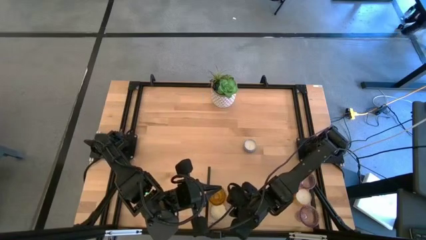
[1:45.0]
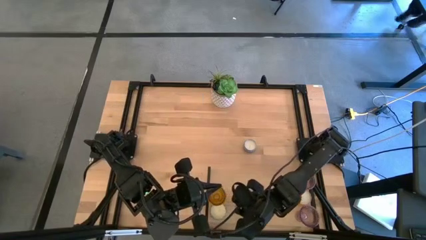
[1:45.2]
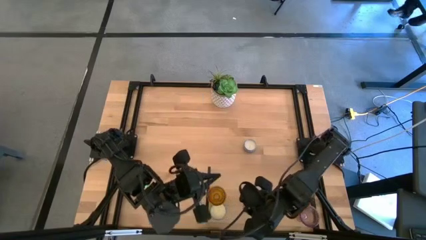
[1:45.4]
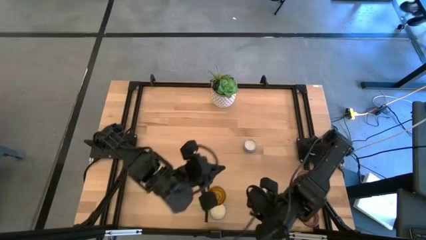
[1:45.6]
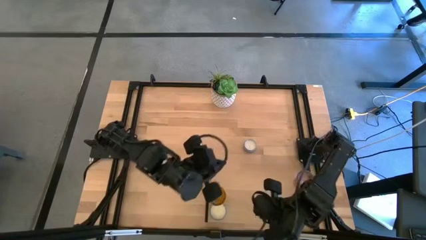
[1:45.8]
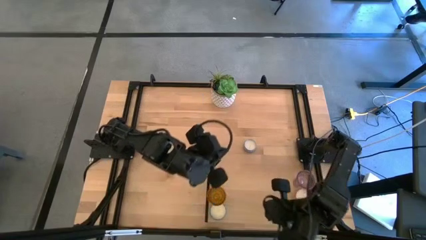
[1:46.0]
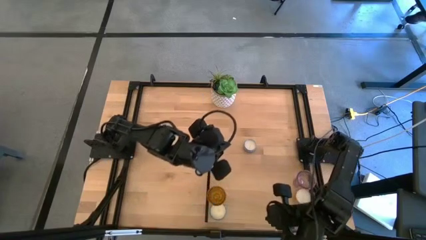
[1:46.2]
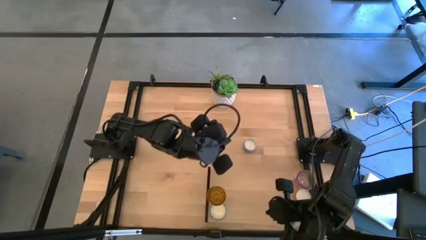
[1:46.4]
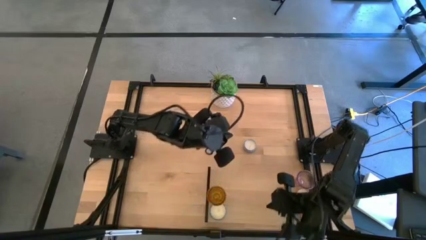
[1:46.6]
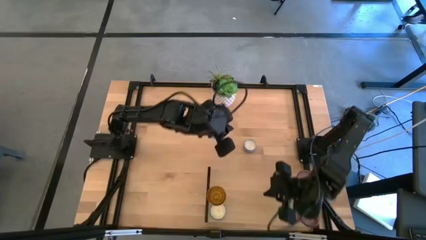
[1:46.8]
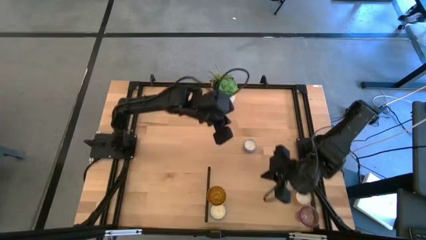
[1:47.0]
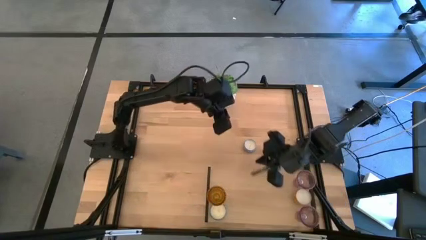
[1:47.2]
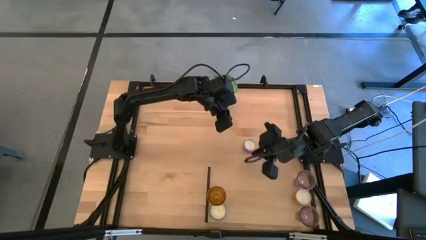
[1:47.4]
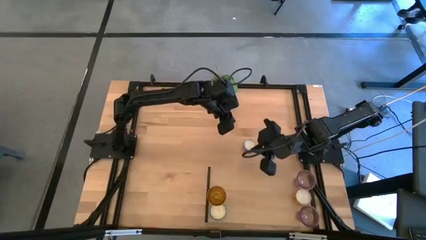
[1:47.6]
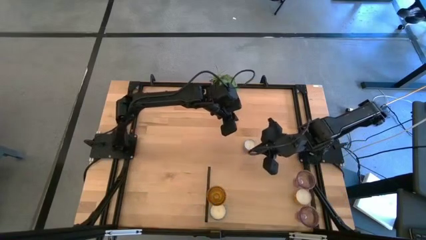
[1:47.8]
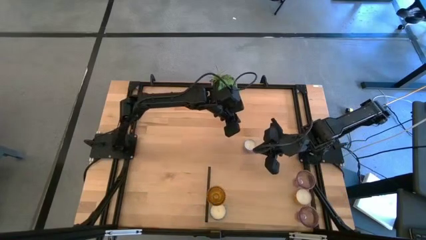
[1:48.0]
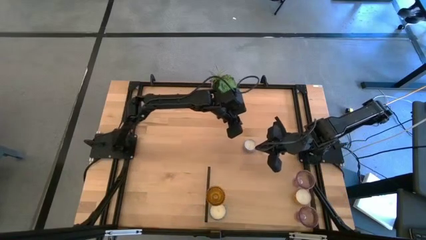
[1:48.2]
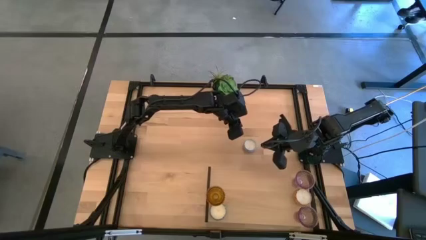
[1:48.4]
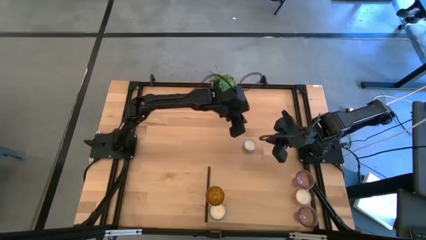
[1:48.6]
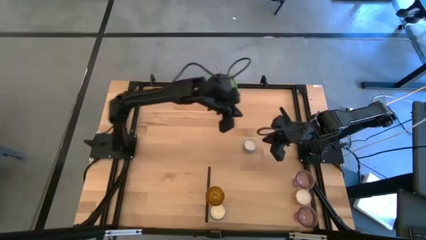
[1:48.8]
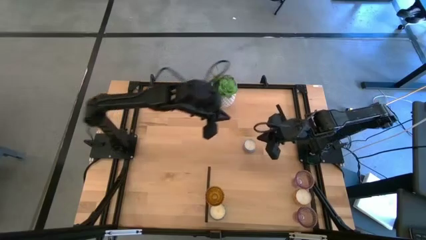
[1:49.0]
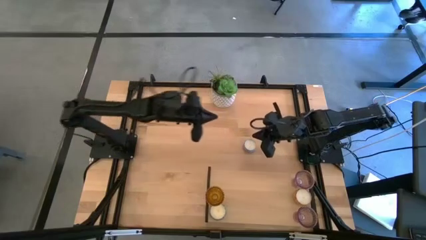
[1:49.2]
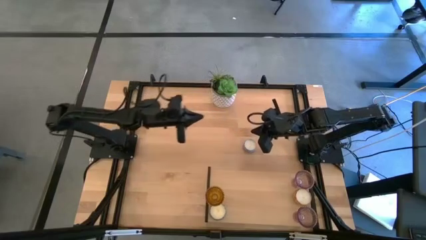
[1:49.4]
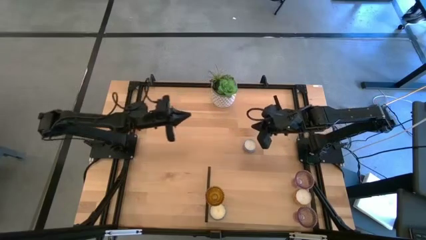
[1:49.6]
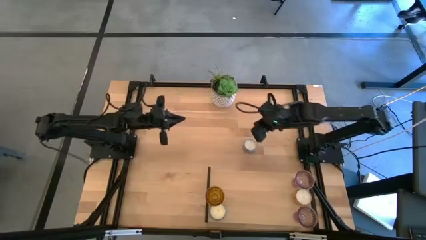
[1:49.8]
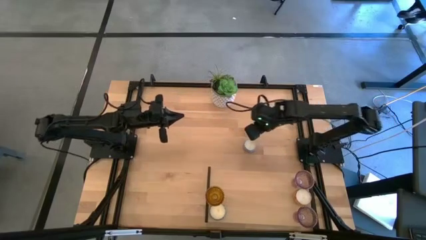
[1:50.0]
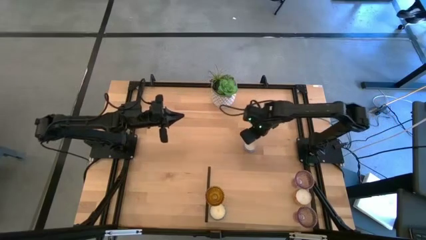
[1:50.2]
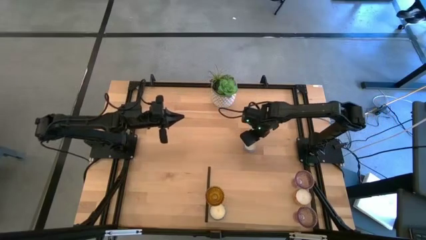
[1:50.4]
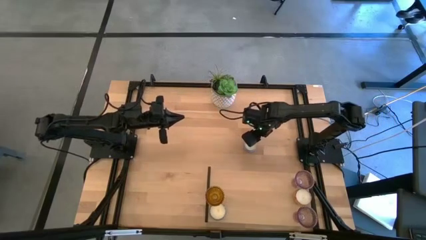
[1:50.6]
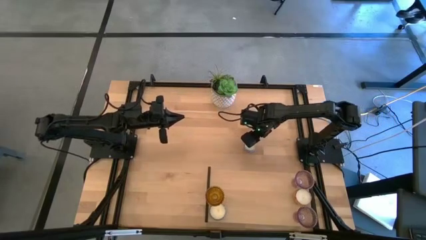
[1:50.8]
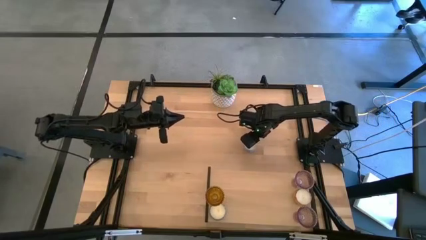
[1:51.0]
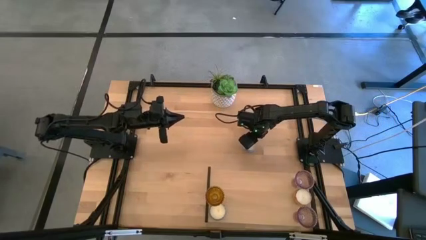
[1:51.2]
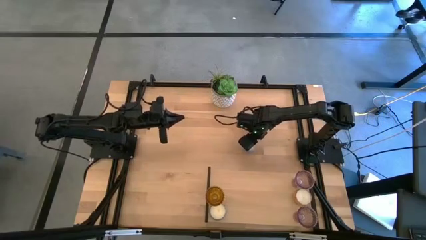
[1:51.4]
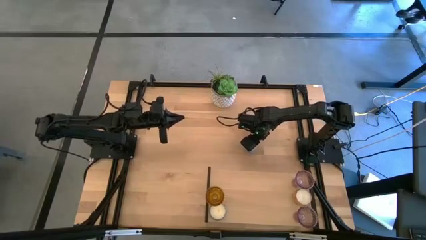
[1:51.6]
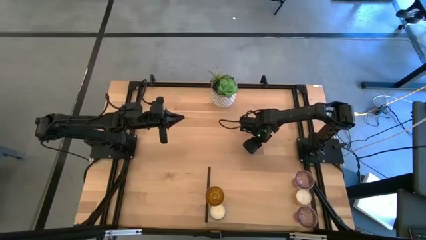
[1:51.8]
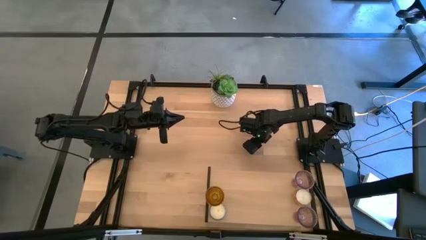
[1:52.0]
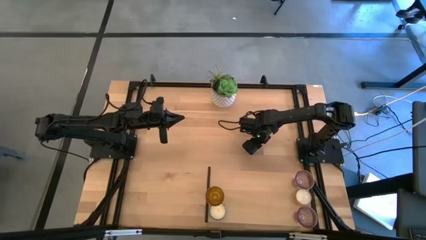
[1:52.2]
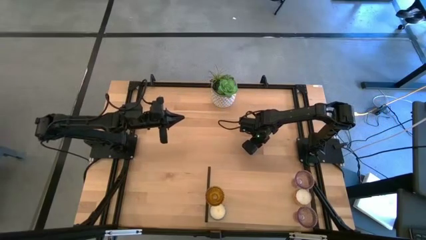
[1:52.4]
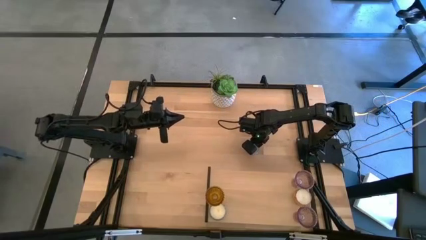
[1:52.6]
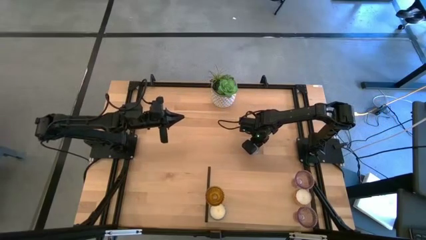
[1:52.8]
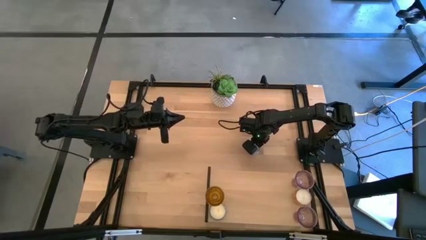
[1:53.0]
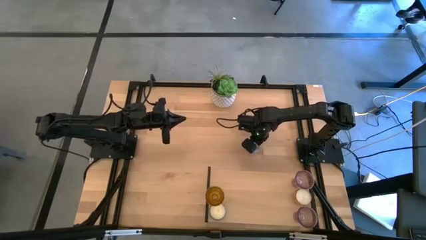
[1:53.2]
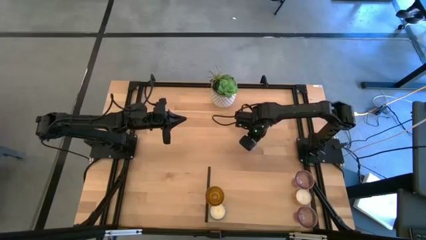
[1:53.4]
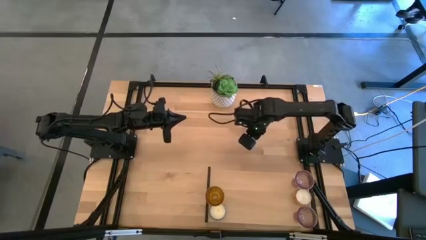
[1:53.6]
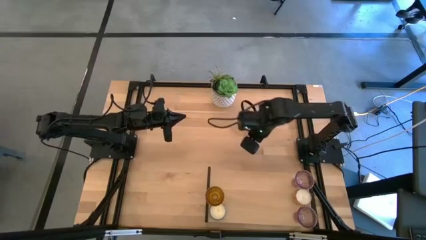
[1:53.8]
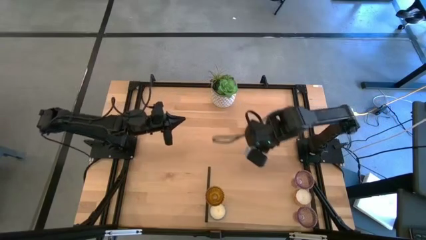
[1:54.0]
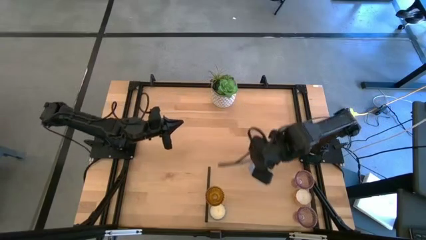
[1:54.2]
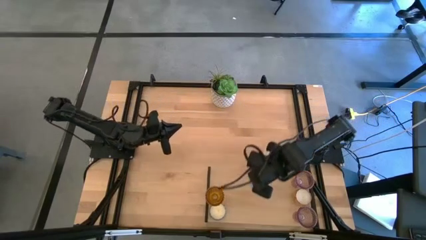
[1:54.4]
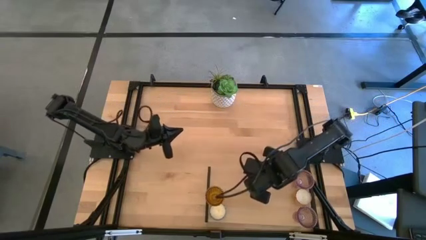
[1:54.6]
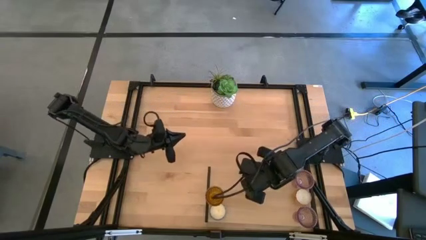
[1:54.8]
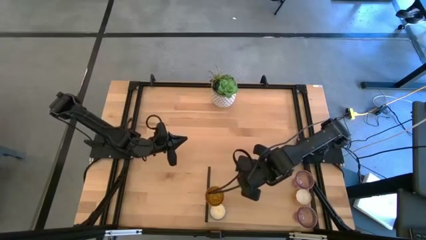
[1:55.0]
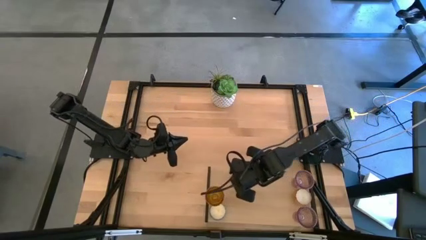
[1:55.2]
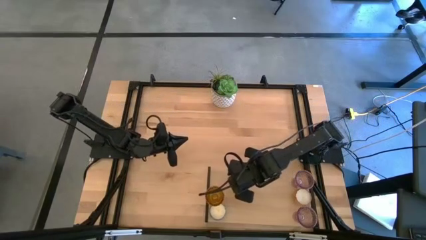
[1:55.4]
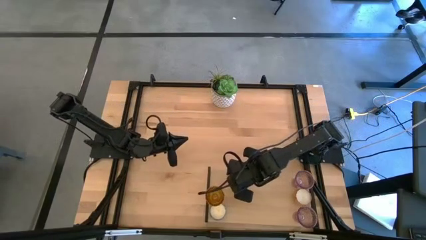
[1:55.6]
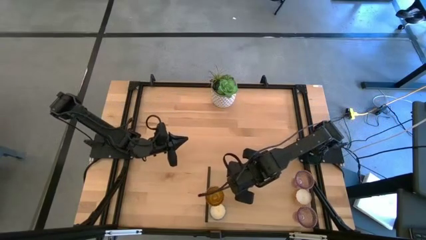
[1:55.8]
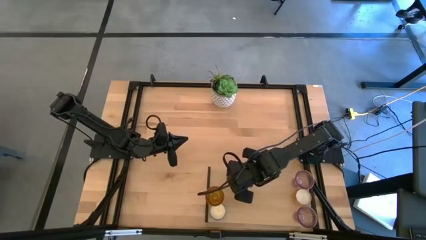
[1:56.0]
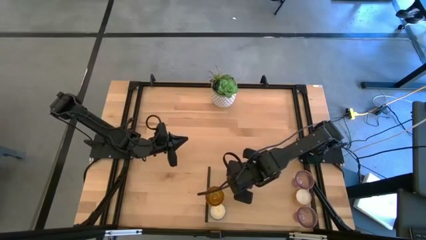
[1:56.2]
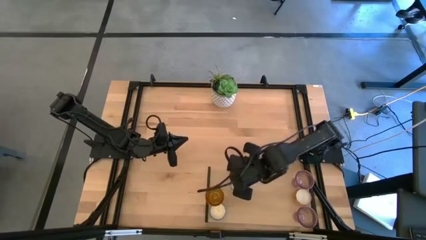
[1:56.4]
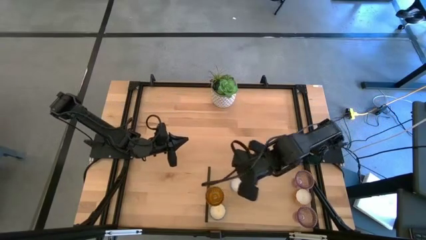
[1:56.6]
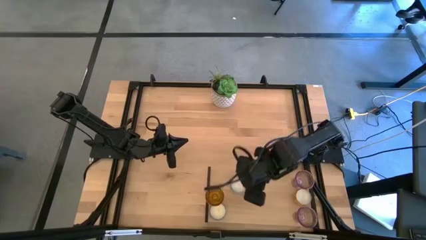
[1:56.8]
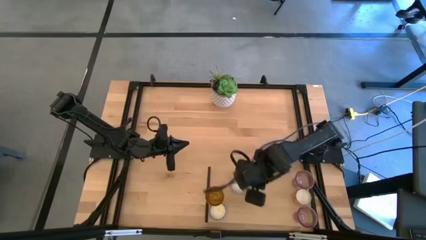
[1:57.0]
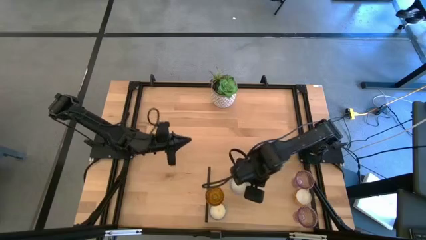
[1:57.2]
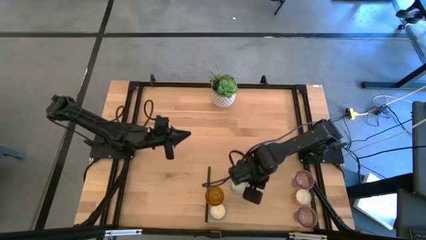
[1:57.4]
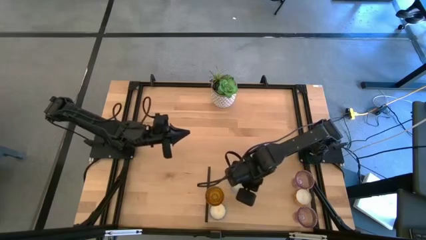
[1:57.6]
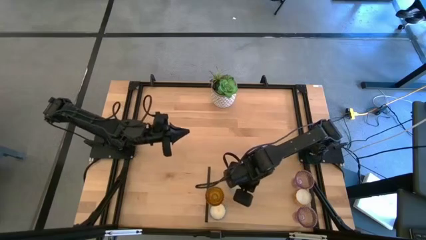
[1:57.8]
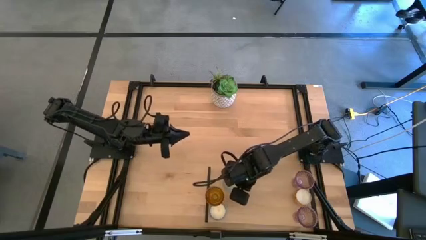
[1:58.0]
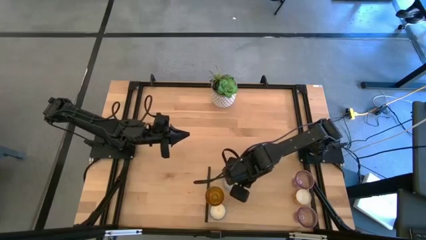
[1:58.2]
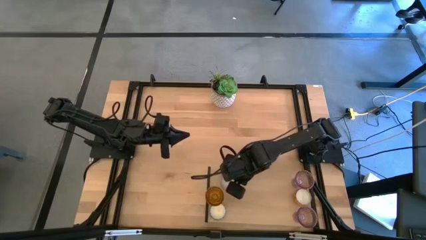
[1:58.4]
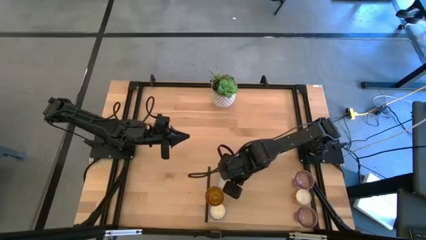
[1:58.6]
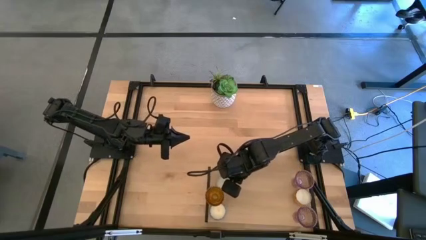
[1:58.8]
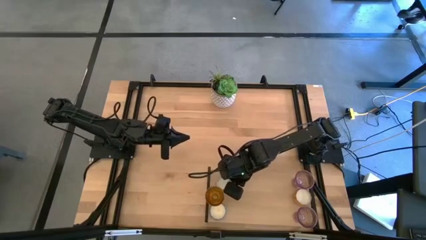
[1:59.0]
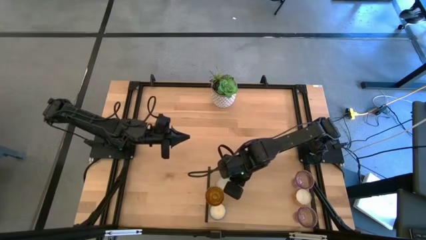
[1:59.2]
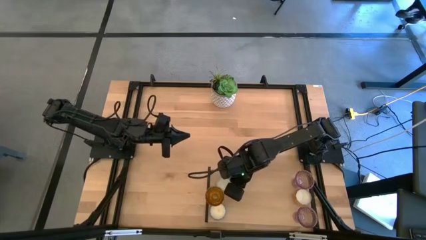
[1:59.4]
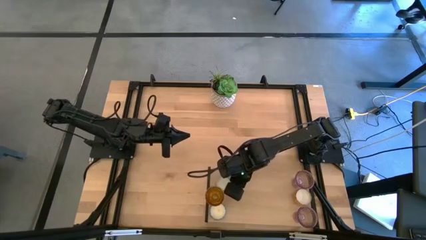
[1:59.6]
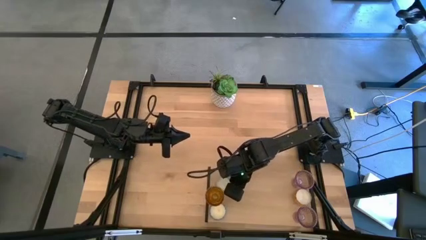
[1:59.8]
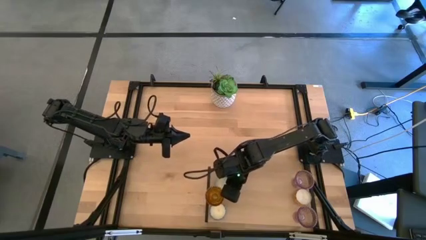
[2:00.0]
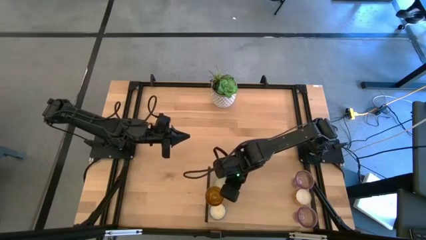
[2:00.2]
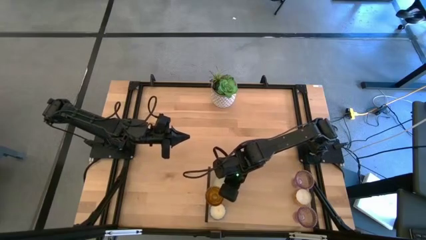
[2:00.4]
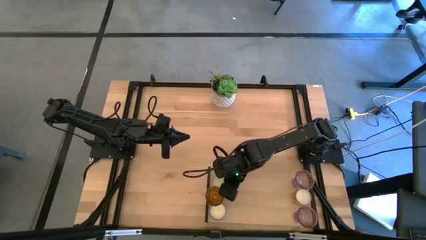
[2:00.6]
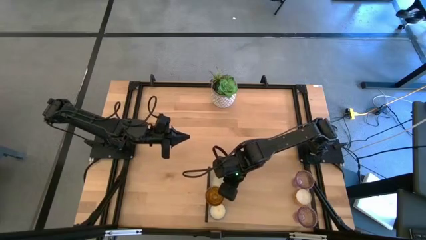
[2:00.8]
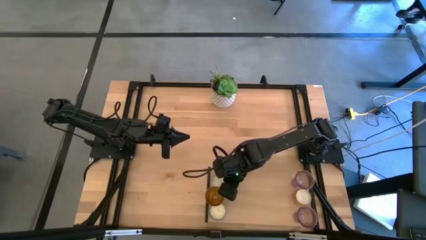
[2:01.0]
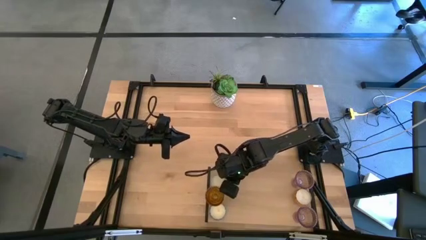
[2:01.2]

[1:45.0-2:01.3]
Task: Pick & Place candle stick holders
Put the light blue scented candle on the shelf aligned with the yellow glass candle holder
